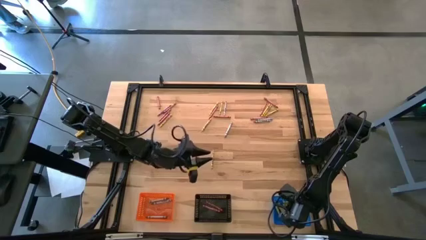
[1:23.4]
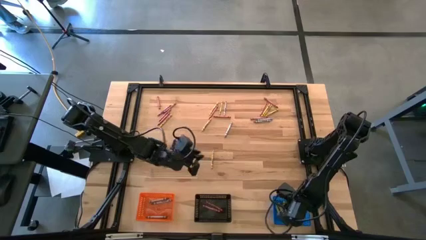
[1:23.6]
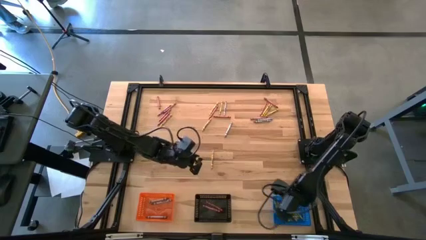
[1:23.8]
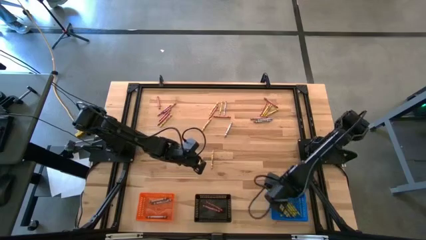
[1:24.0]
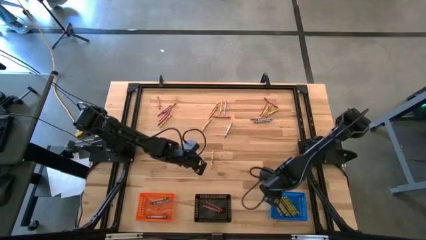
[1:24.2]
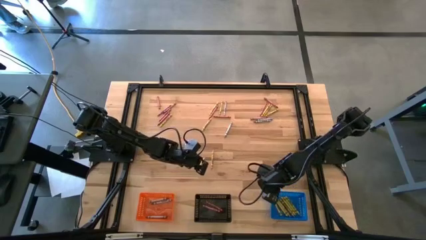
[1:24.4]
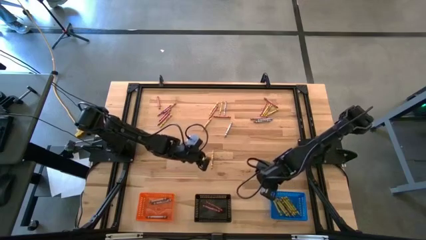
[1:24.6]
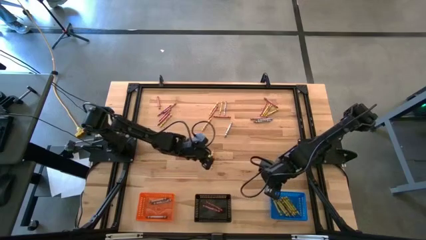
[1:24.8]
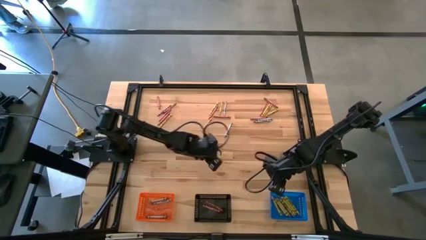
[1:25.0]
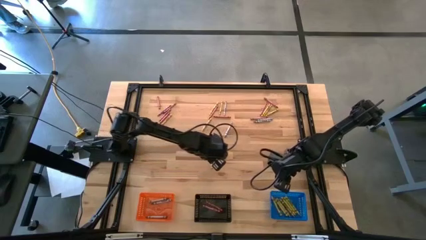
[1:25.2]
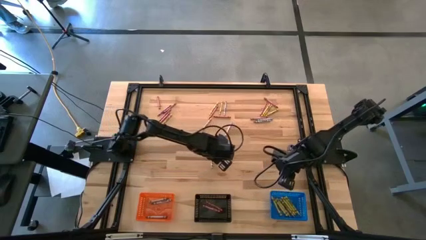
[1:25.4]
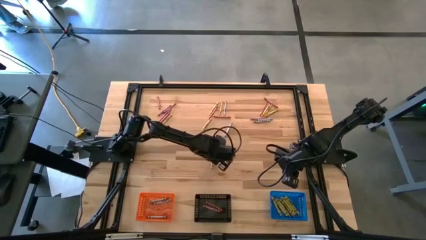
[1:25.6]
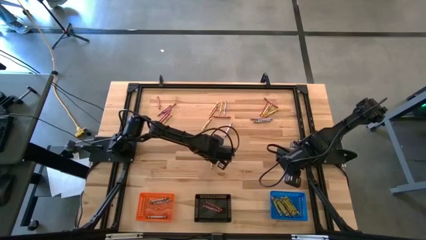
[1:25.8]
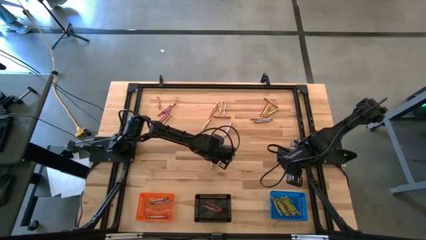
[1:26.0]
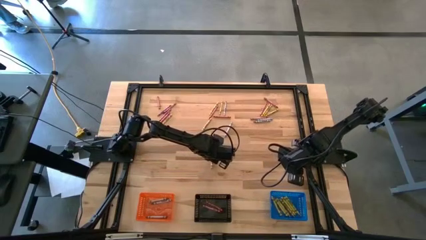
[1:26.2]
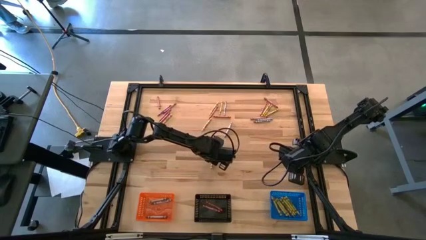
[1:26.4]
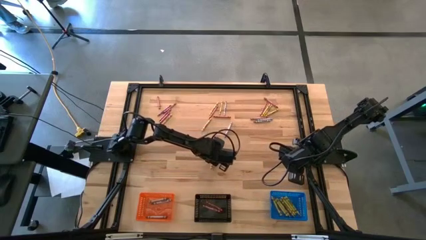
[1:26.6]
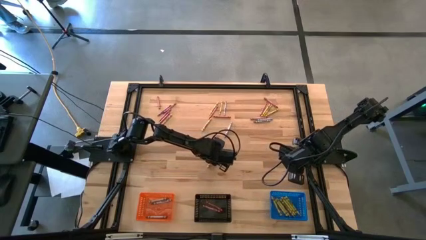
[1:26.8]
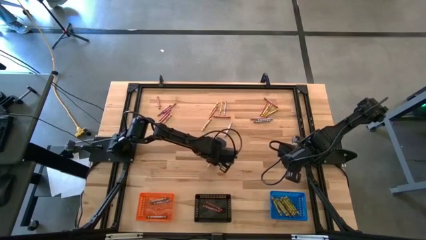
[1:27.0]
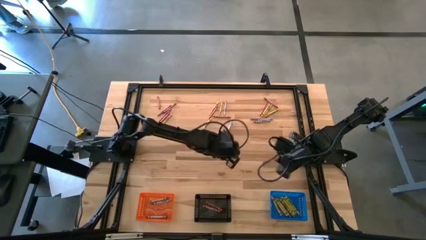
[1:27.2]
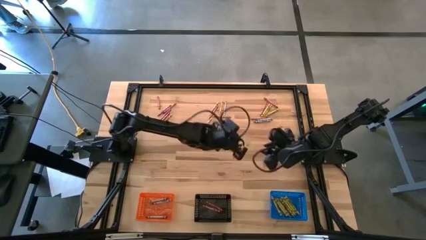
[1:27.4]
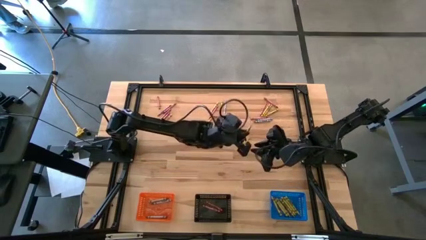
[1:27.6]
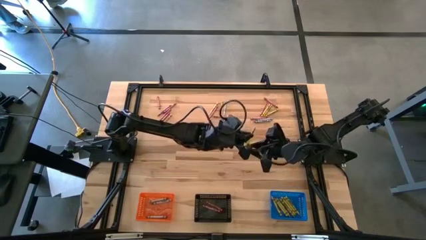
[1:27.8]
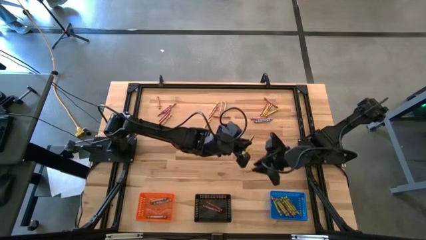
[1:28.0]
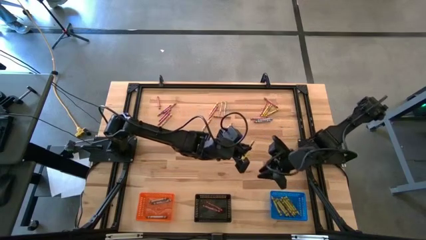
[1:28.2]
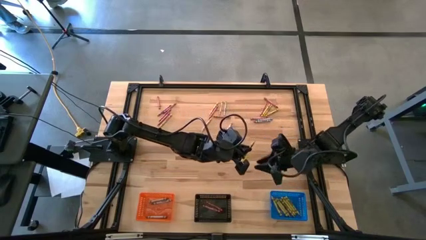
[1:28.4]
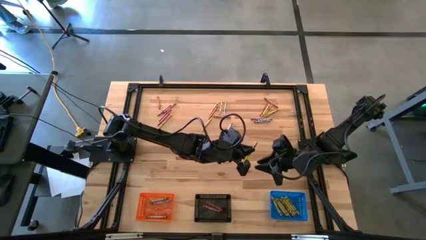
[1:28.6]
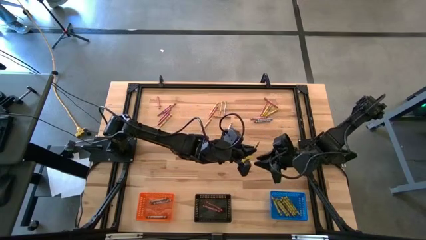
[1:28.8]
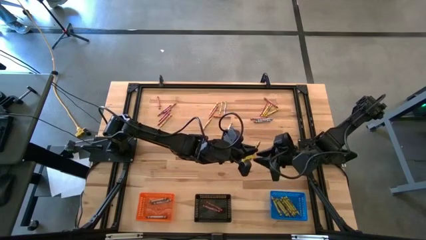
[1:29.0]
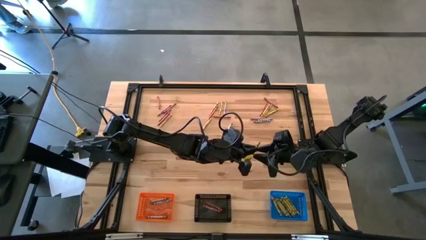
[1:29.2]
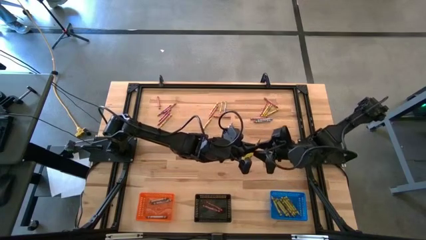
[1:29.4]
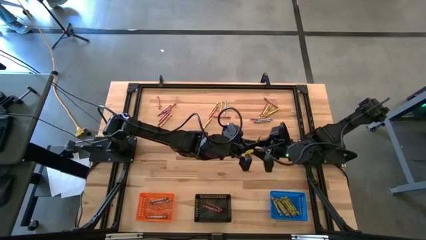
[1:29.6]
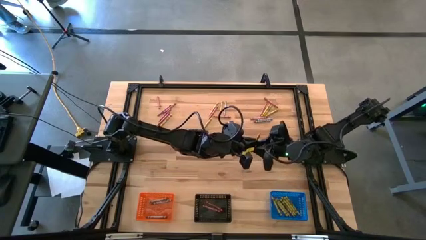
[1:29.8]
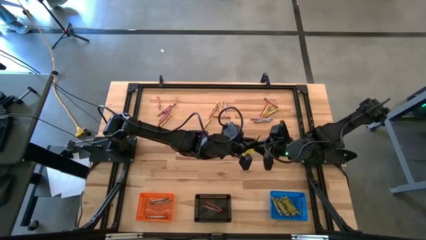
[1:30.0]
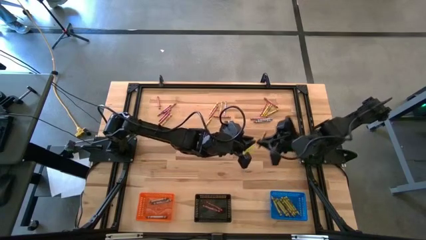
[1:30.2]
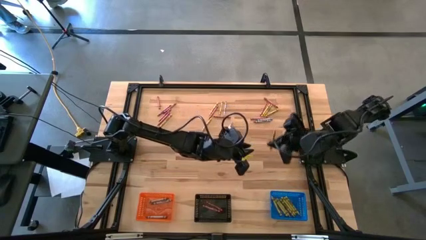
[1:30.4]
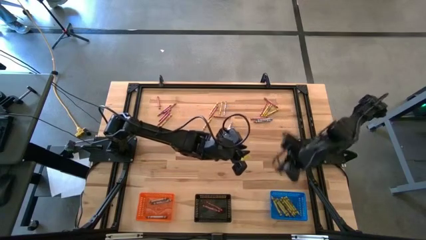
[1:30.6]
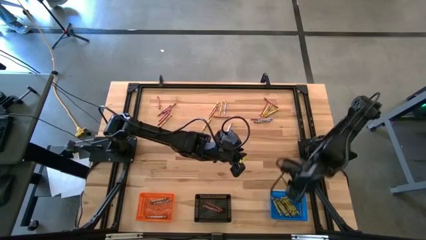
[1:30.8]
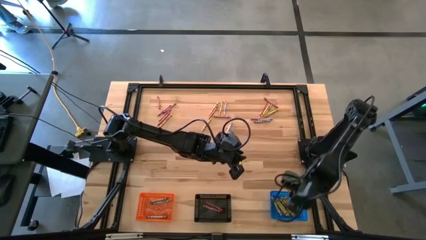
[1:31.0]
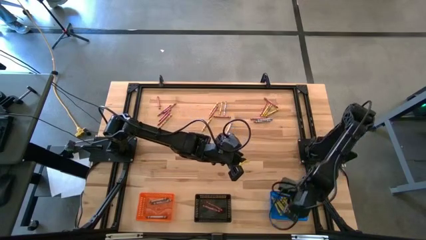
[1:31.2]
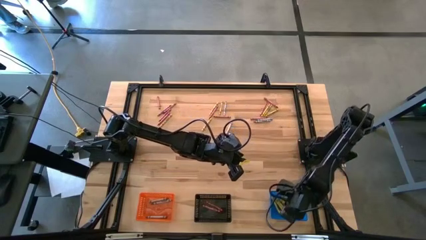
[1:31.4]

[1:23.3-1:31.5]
Task: Sort crayons
Put the yellow crayon into the blue bin

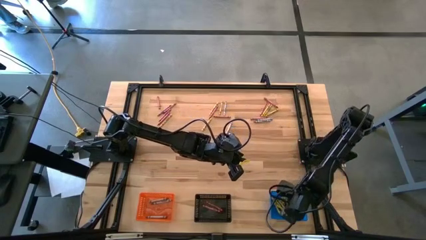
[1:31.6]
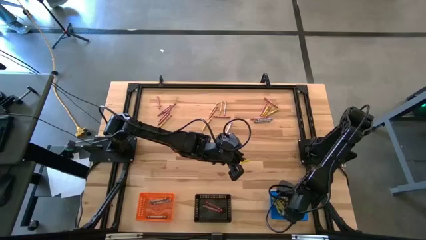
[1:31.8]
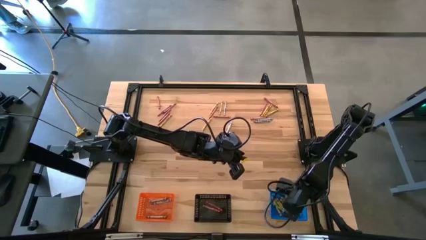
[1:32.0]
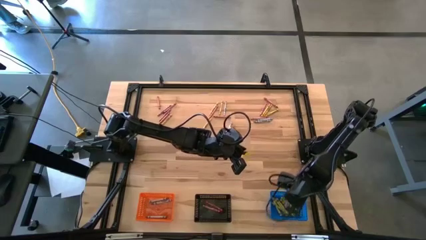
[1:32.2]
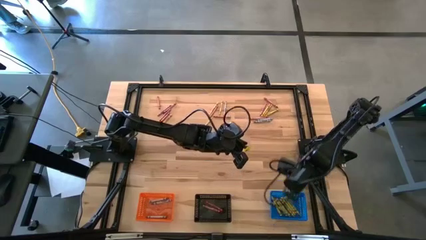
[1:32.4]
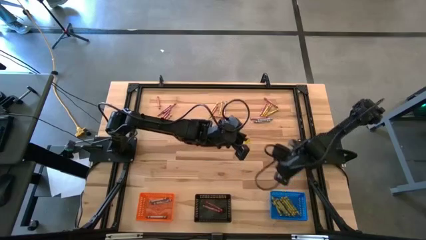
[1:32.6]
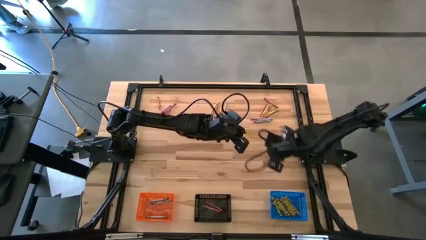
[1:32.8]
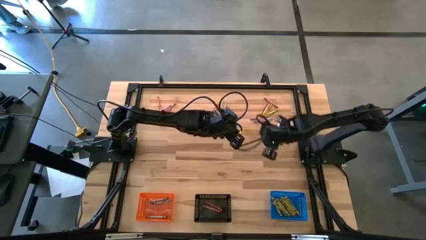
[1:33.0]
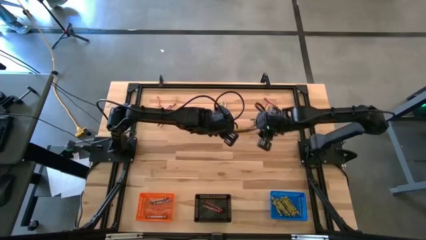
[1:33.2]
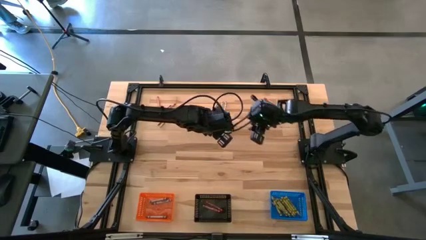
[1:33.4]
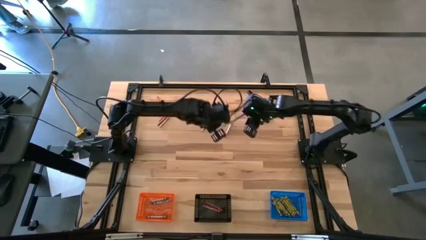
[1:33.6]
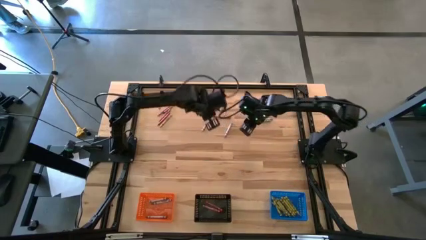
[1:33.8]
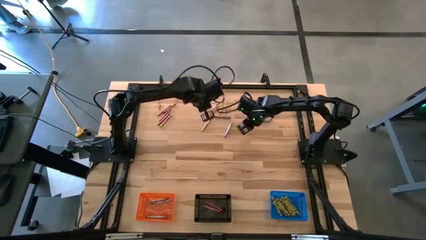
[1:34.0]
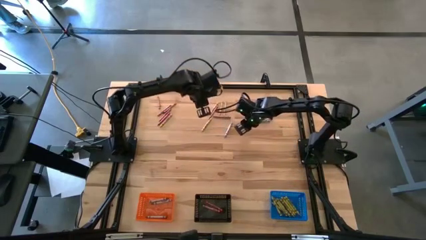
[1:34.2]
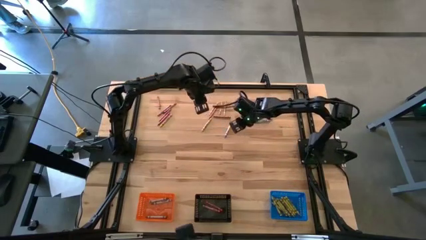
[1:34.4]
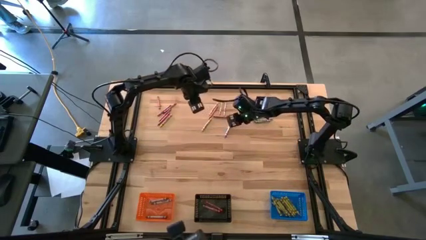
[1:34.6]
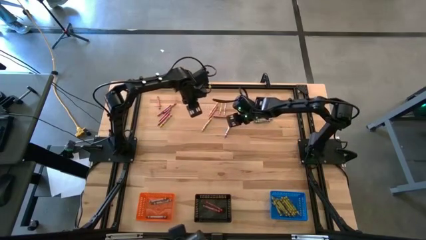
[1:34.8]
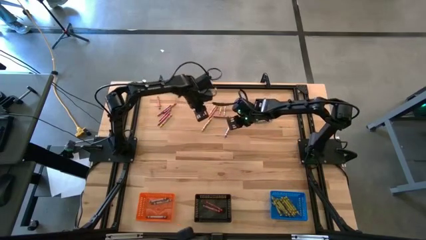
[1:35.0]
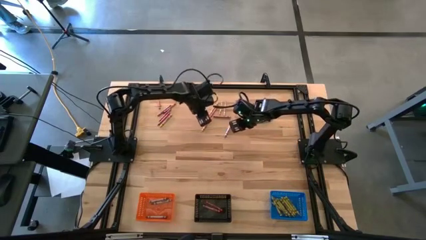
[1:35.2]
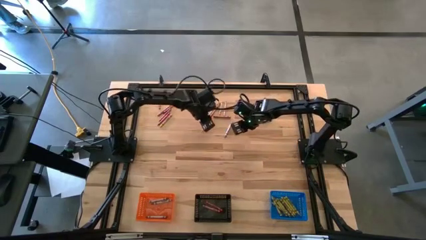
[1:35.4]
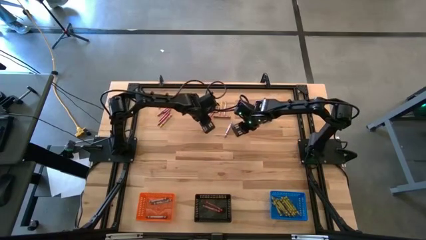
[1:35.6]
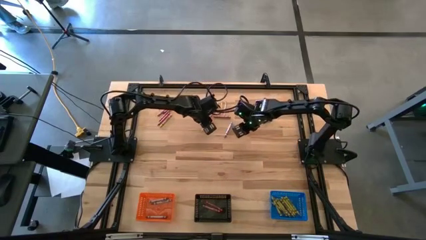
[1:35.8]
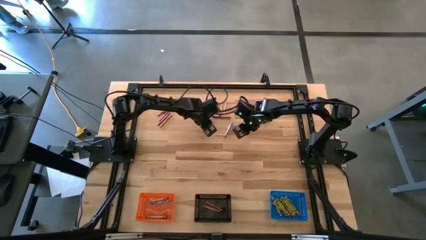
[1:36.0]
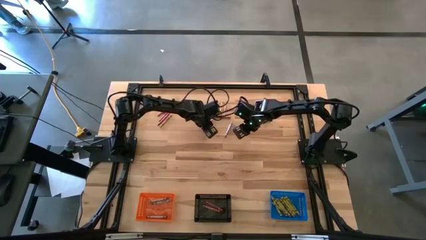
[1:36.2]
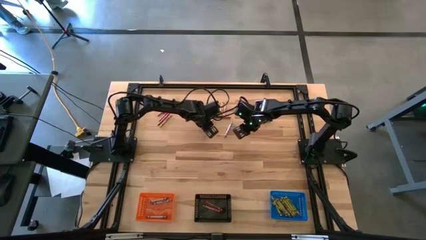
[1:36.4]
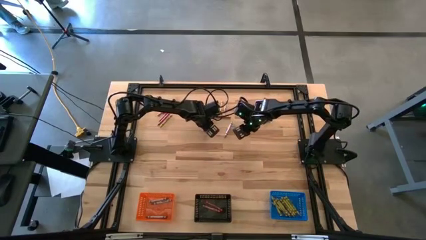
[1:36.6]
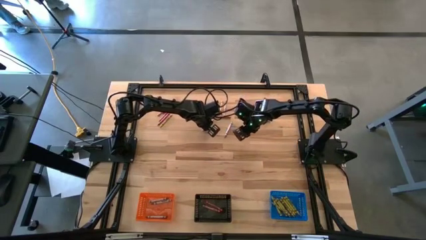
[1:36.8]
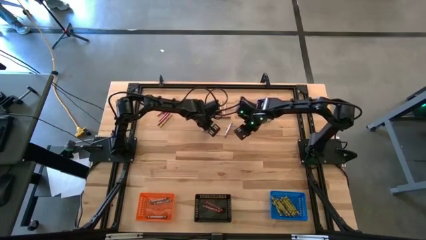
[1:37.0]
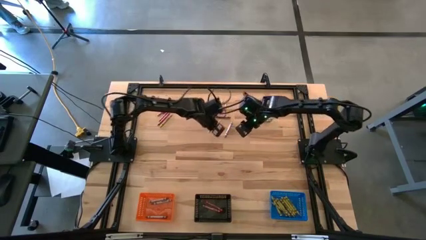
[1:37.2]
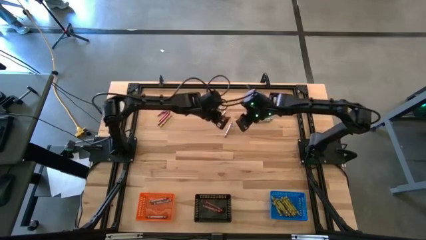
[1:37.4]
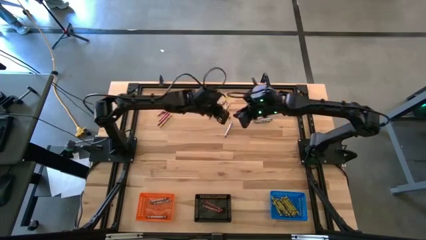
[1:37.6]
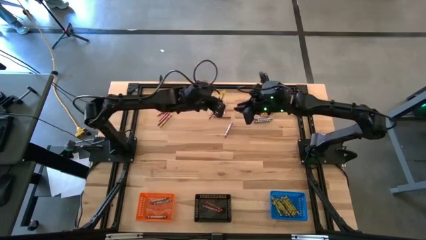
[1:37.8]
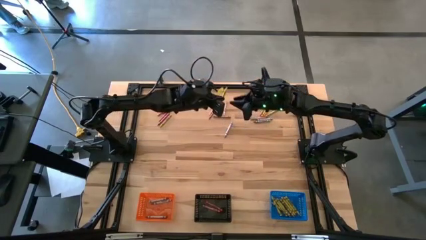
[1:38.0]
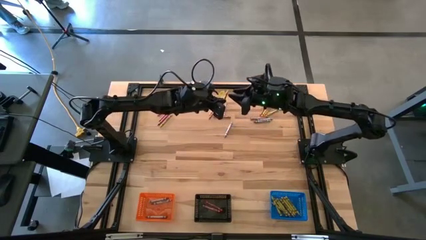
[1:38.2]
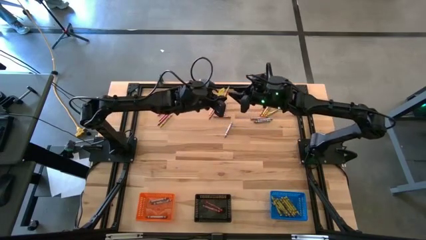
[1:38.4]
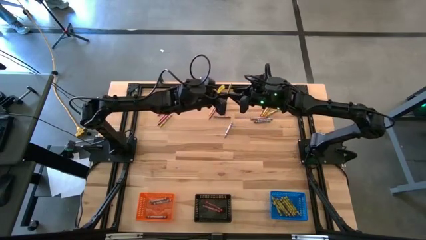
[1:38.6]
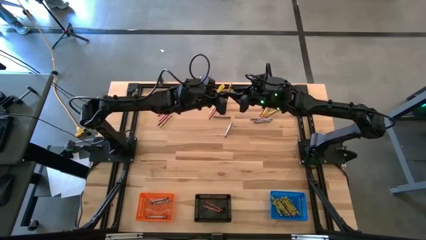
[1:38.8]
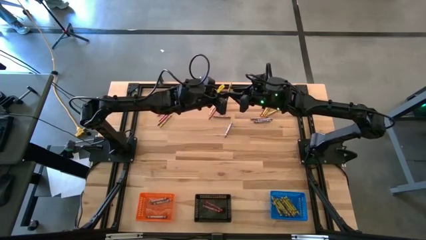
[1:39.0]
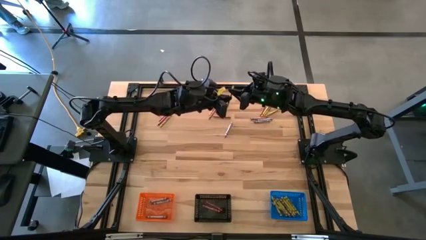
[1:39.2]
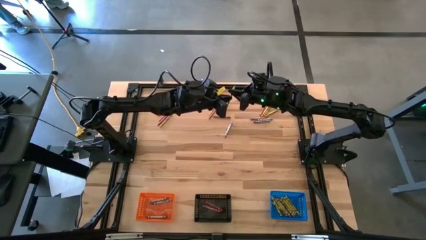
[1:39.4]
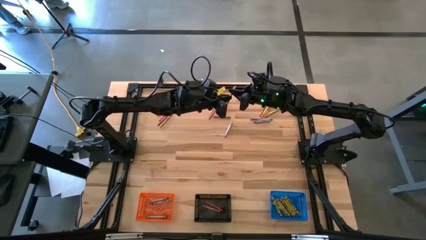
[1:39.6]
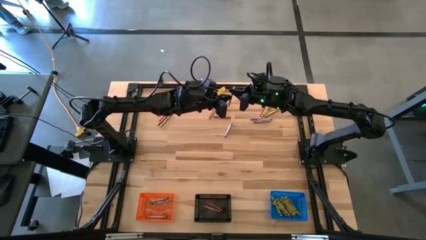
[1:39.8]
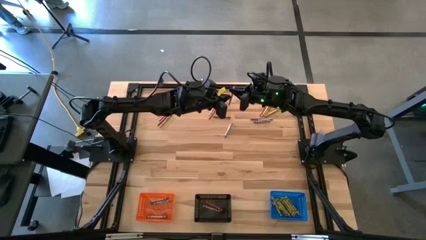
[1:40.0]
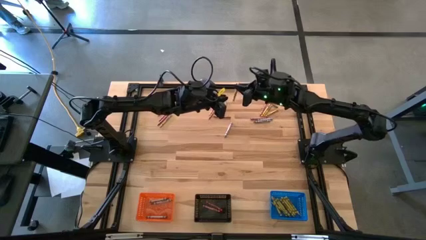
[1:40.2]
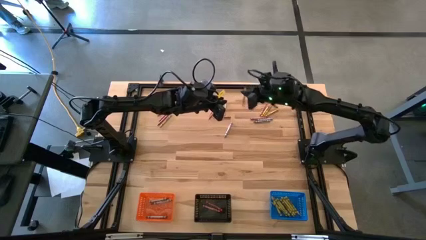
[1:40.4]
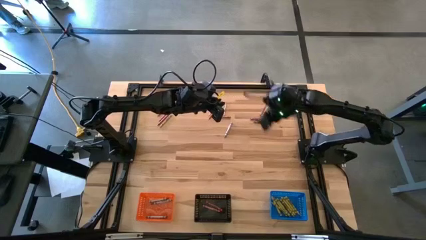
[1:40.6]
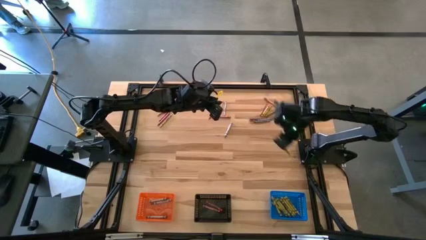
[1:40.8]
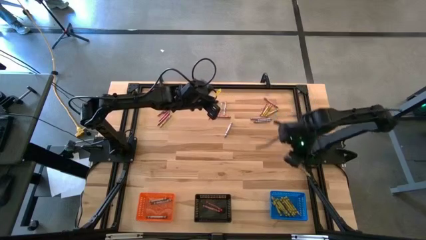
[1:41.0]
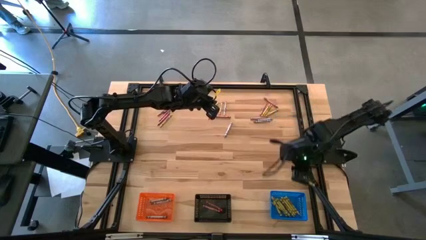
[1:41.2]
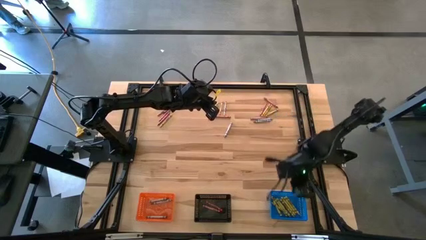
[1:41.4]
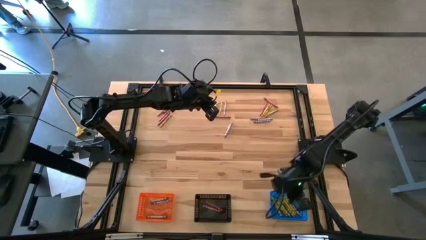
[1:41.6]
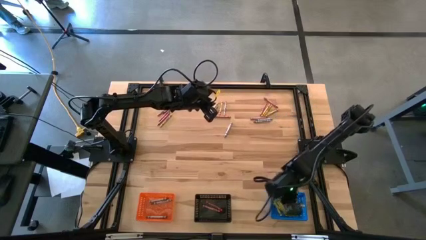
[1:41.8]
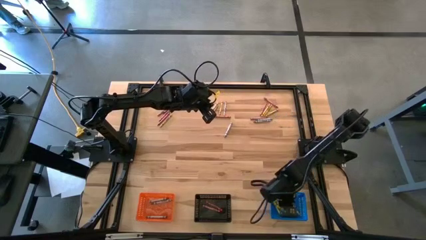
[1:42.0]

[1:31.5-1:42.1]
Put the yellow crayon into the blue bin
